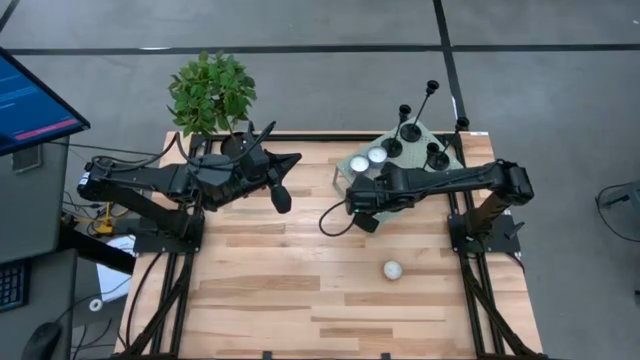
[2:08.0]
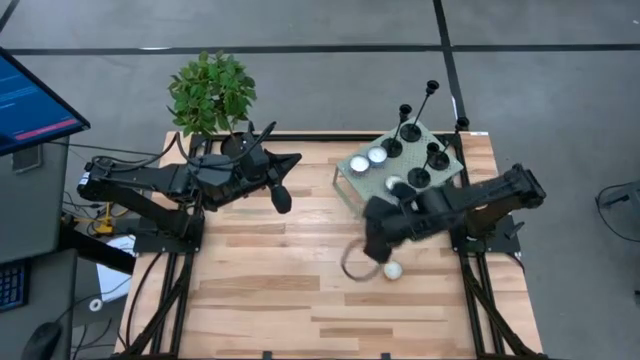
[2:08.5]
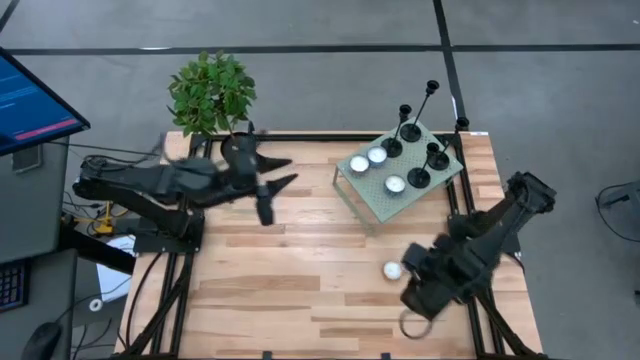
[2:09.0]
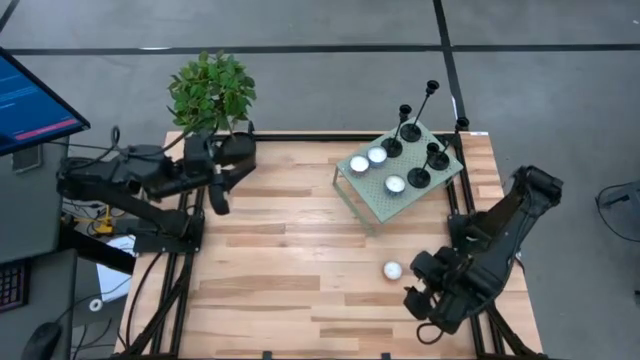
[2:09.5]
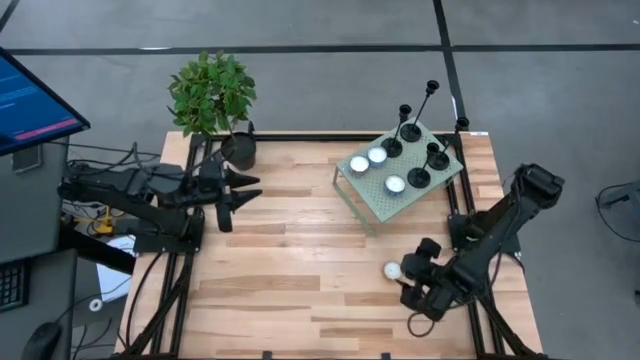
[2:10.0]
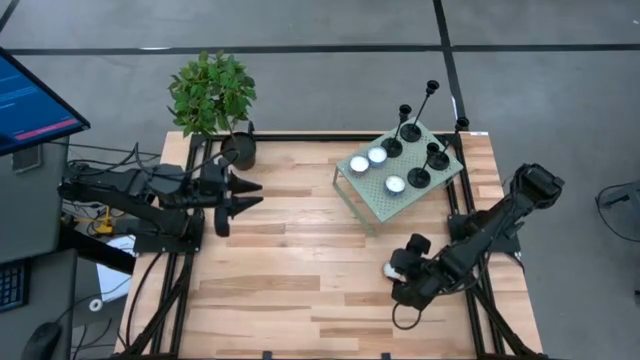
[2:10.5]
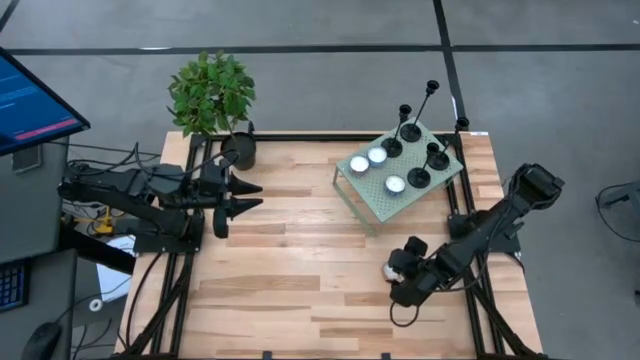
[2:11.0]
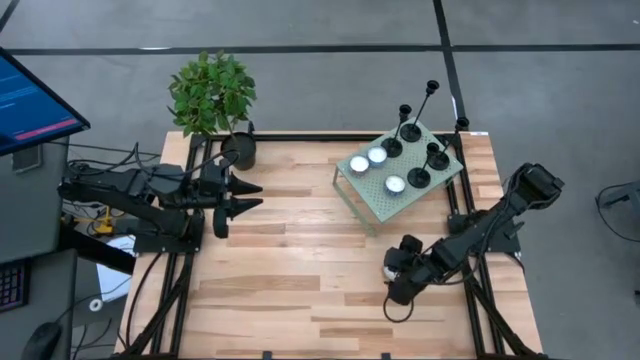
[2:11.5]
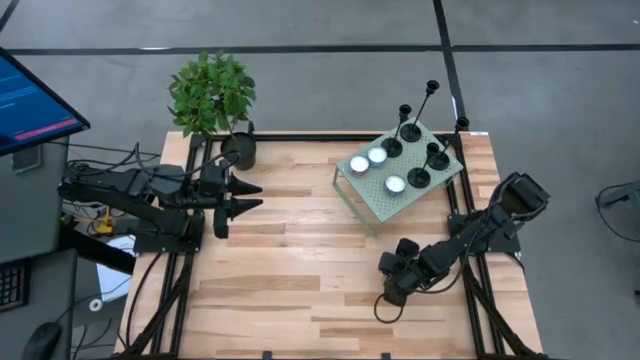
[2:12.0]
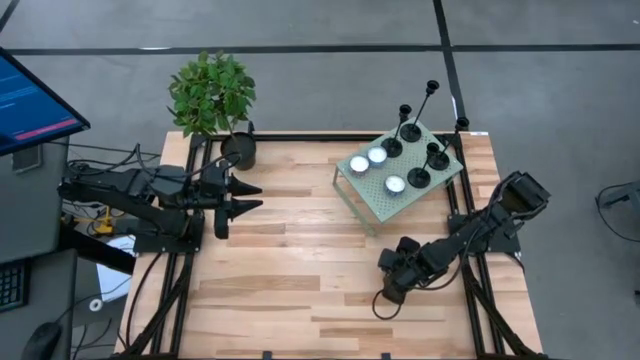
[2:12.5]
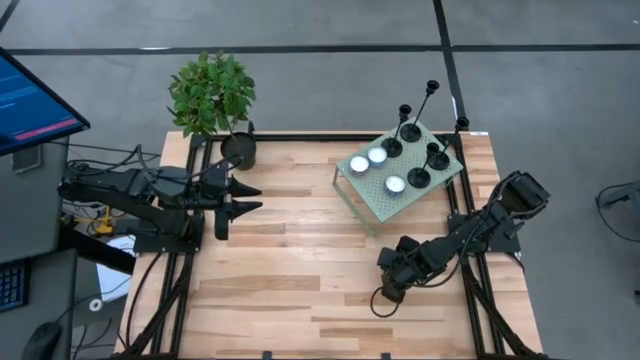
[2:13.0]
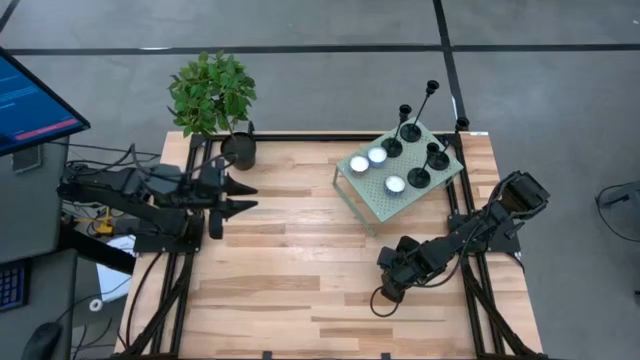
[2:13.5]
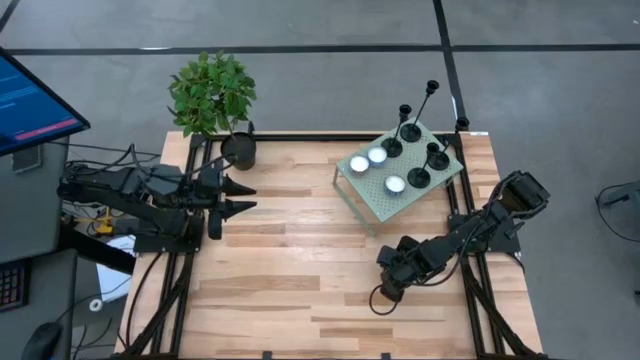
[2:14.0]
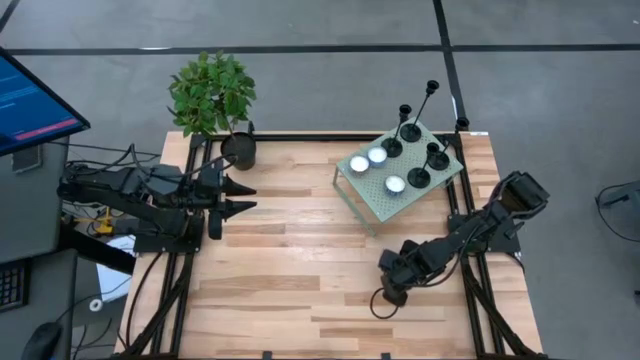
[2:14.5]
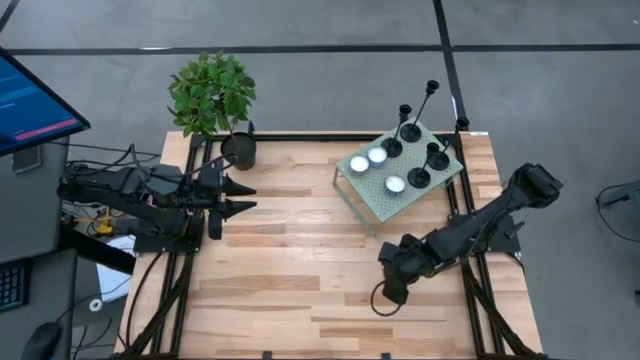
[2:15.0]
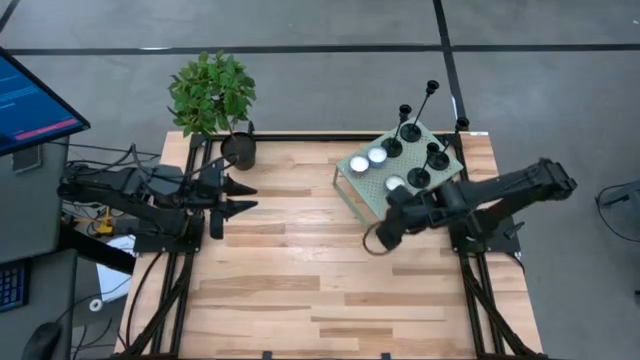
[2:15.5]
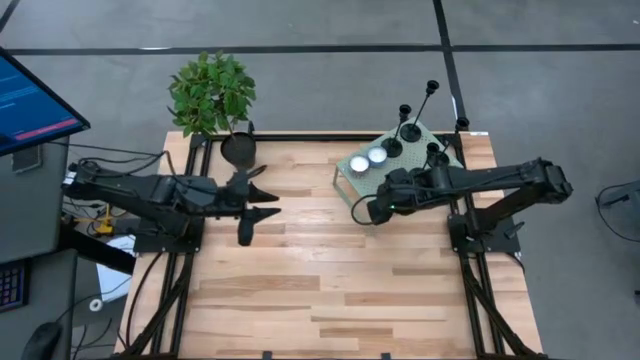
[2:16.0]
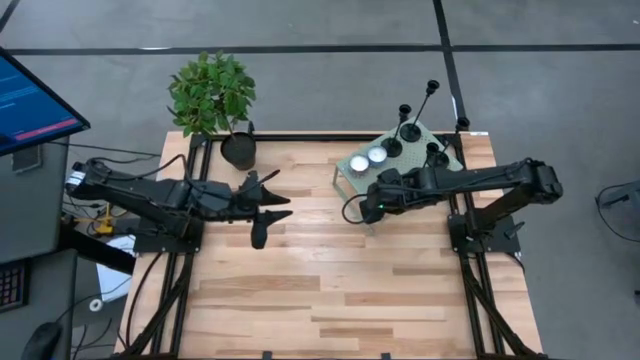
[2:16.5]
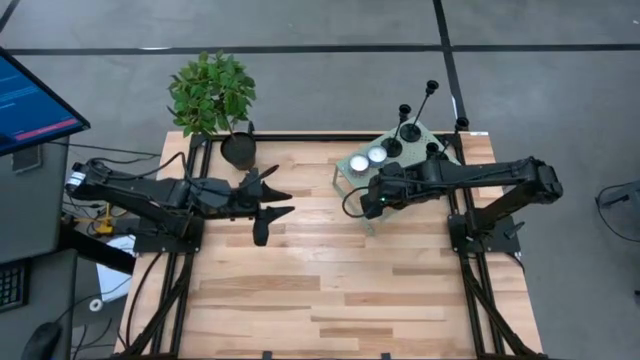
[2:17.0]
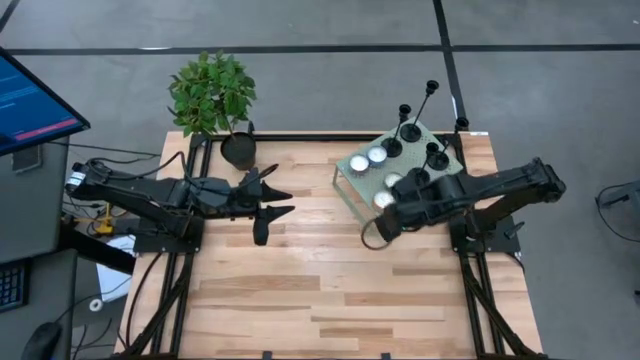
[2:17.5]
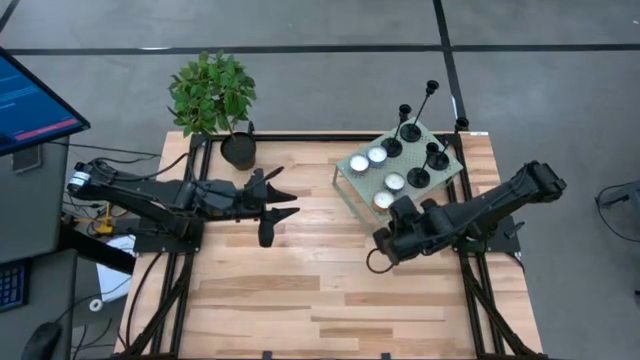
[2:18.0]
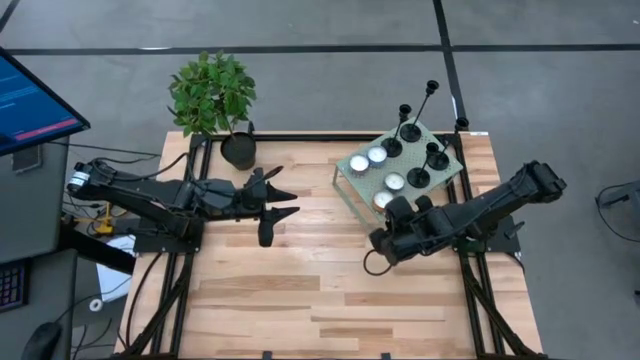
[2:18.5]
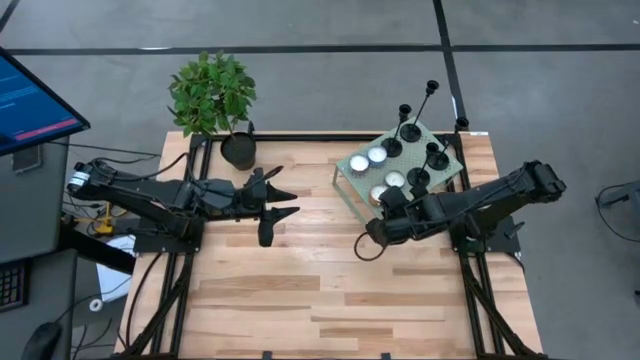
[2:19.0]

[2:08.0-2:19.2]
Task: Pick & Place candle stick holders
Put the orange scented candle on the shelf

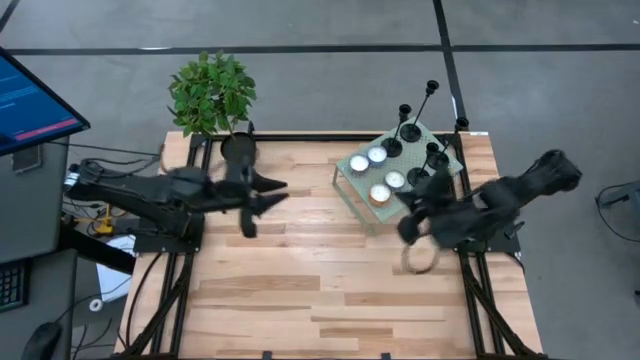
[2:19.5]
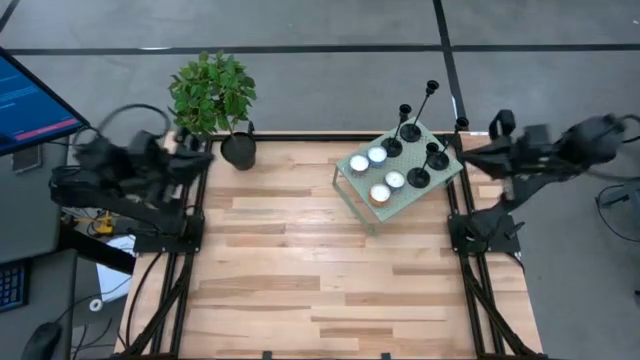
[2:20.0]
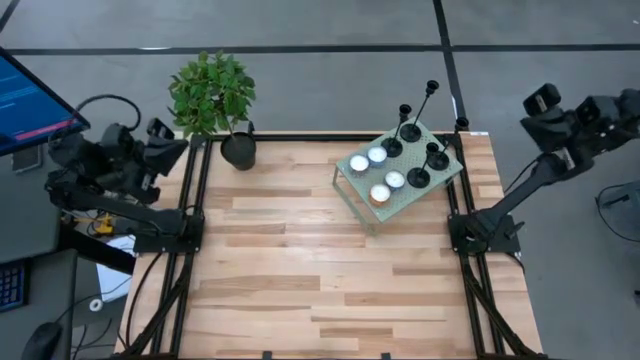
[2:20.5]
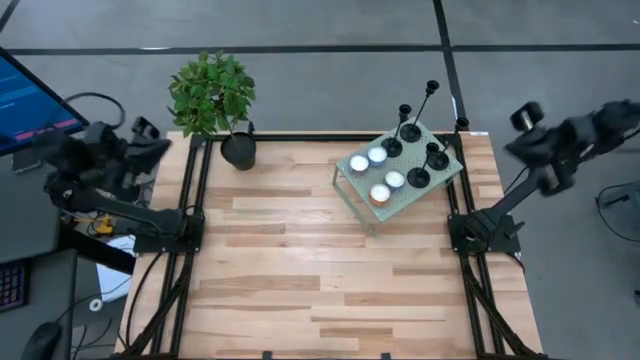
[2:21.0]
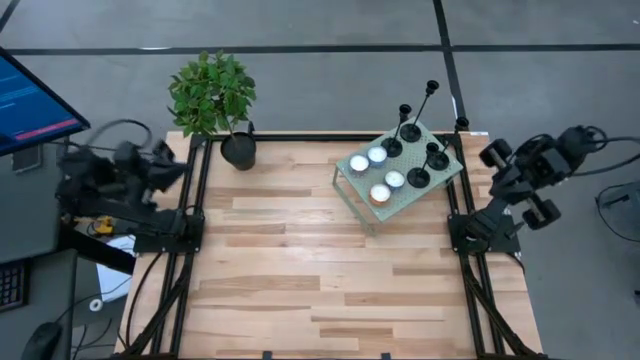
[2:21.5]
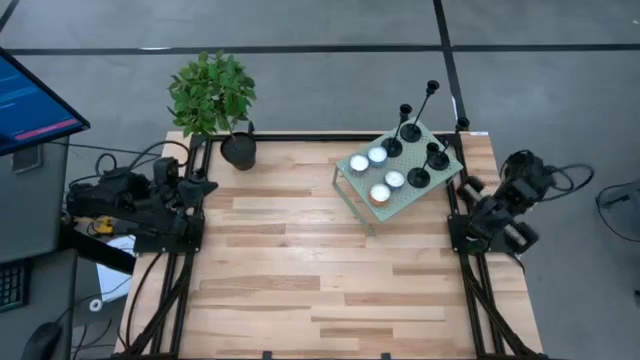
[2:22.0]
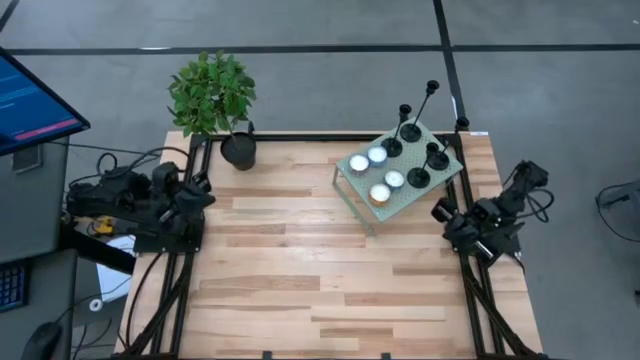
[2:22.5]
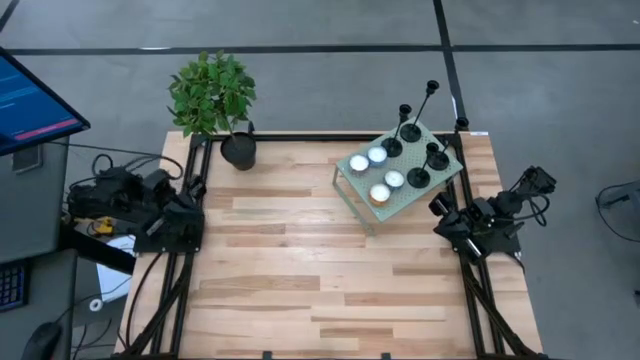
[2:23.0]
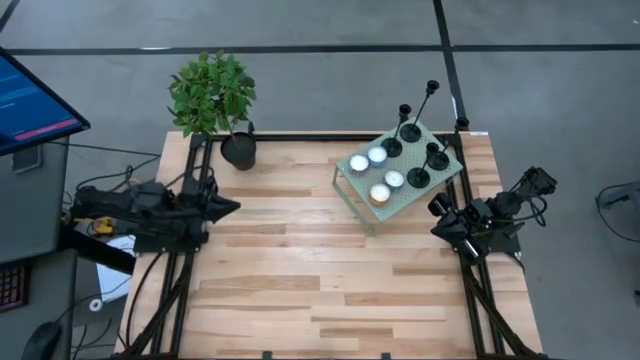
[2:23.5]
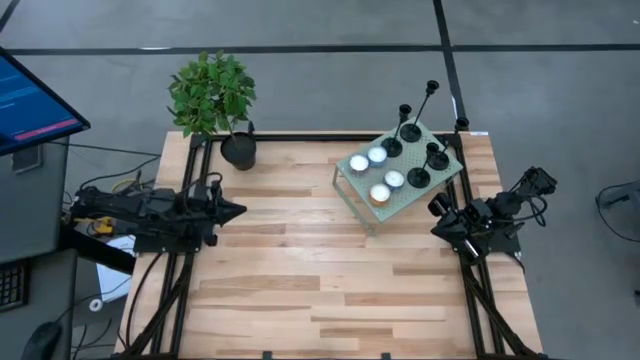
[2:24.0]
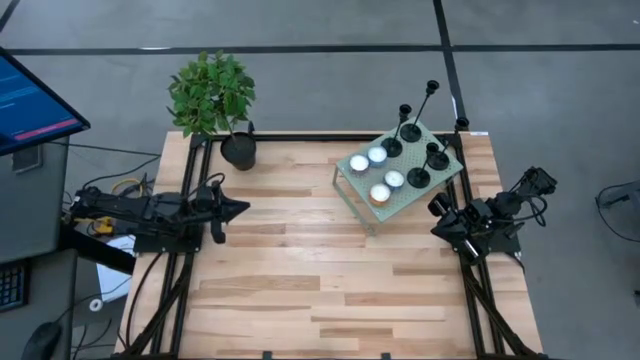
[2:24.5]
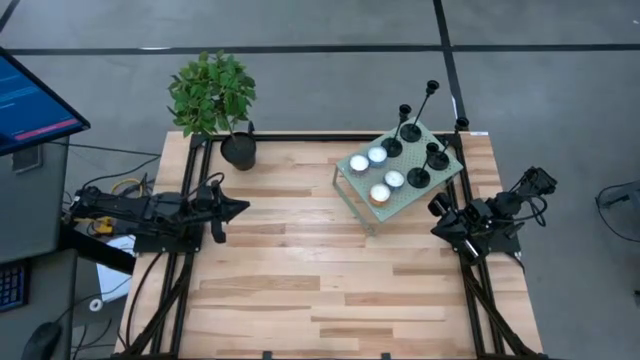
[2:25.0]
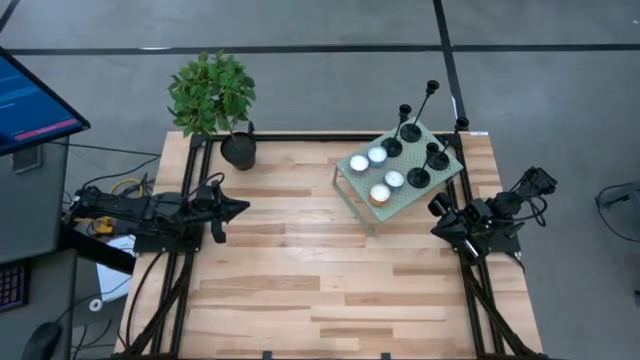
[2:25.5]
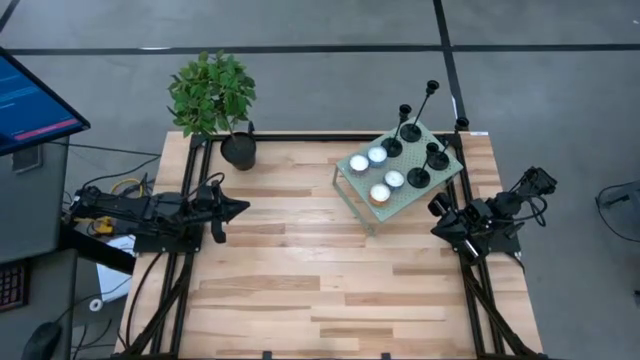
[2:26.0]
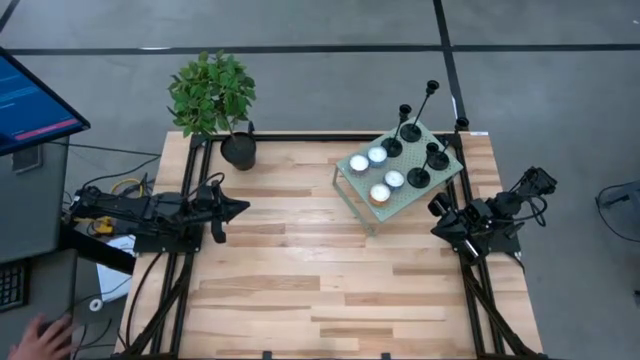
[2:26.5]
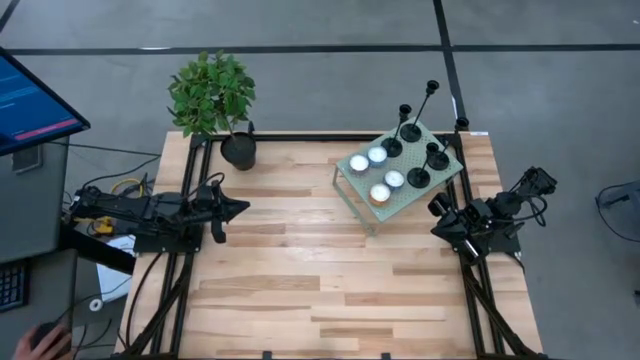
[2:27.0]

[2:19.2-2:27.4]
Return to Home Position

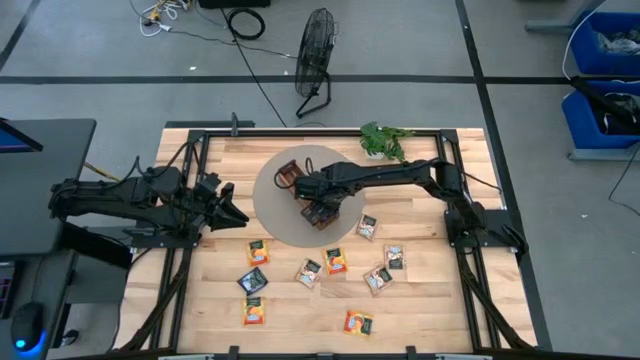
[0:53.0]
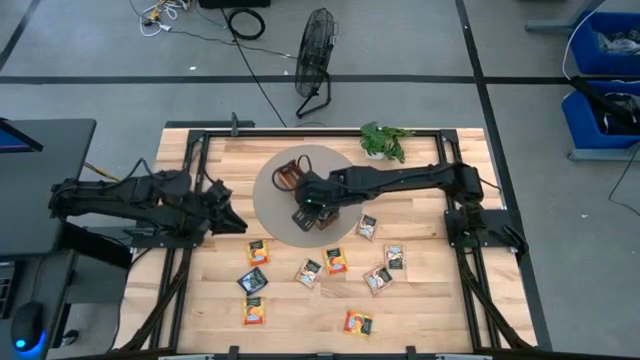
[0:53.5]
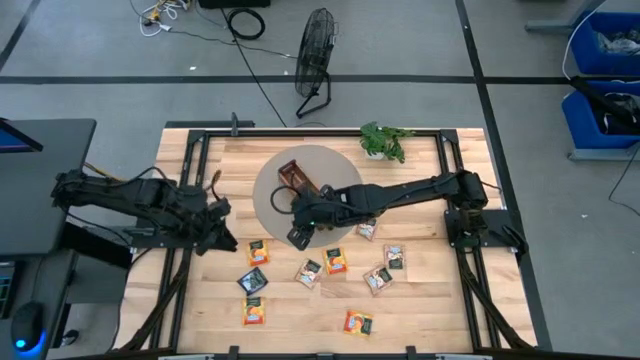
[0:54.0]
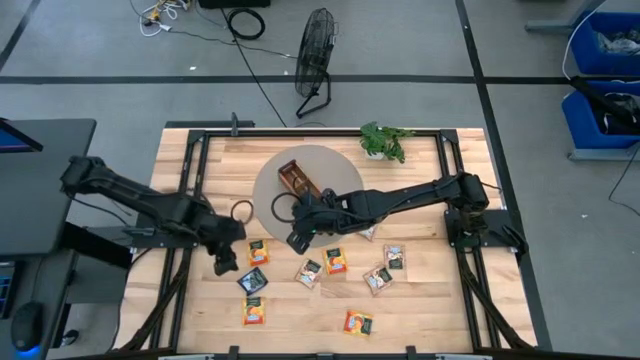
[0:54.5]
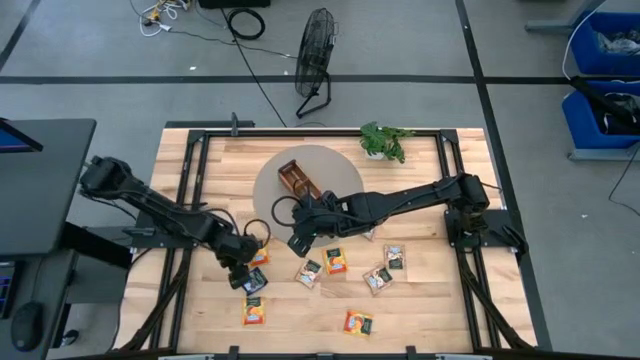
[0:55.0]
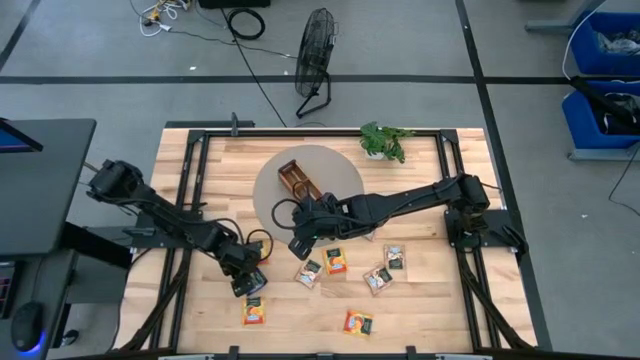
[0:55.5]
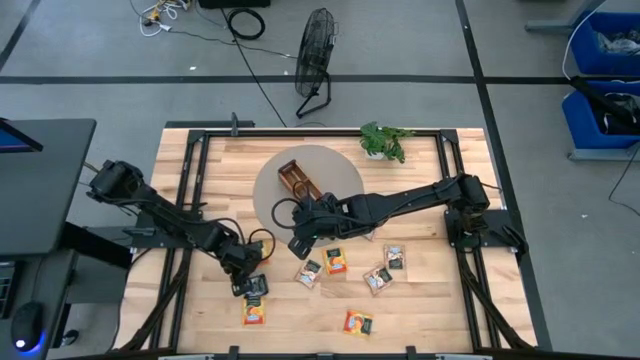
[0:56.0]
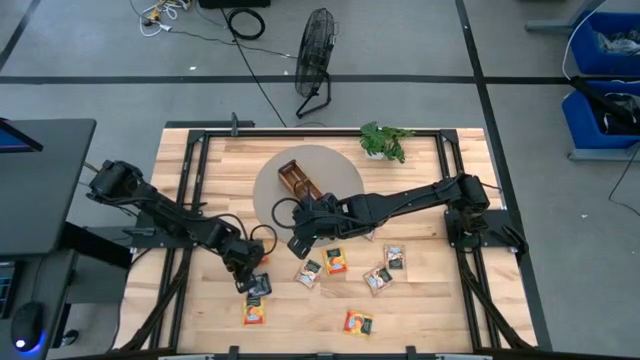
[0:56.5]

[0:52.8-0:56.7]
Task: Pick & Place Tea
Put the purple tea bag into the right section of the wooden organizer
